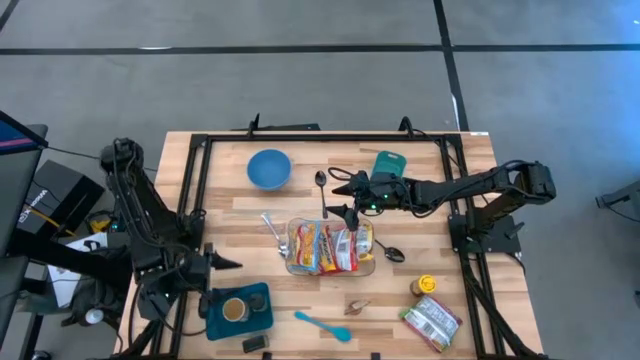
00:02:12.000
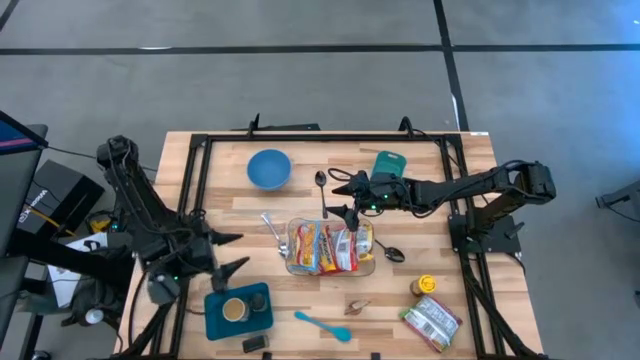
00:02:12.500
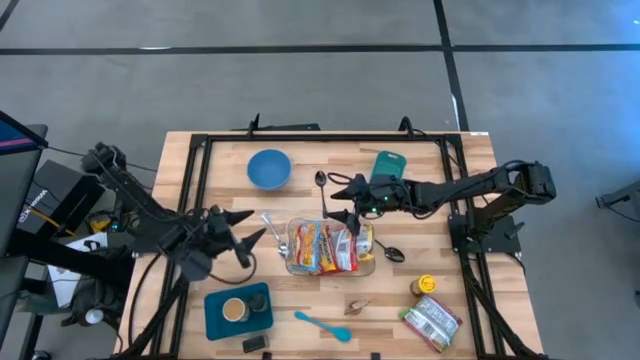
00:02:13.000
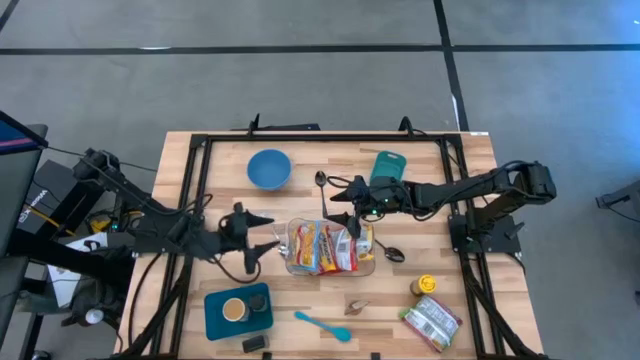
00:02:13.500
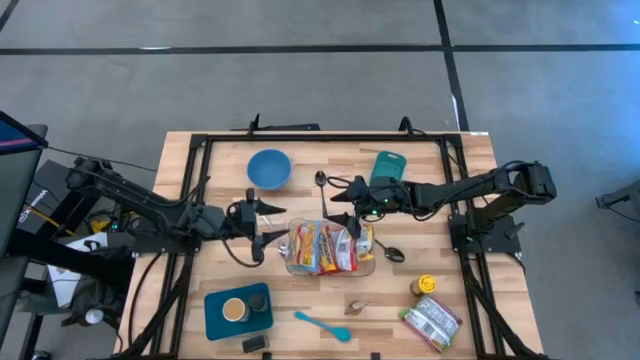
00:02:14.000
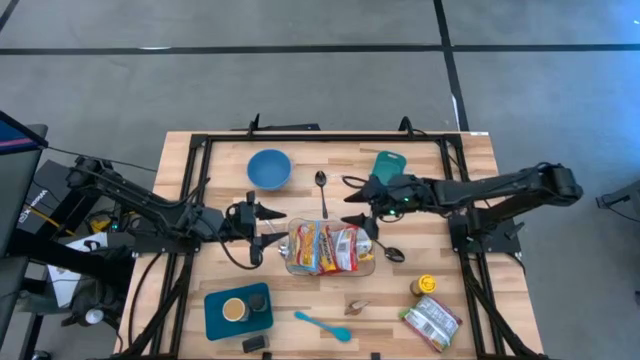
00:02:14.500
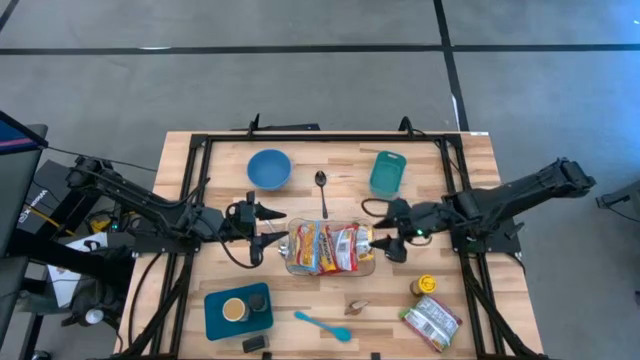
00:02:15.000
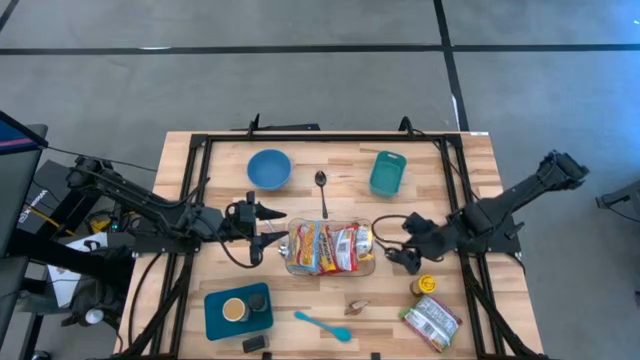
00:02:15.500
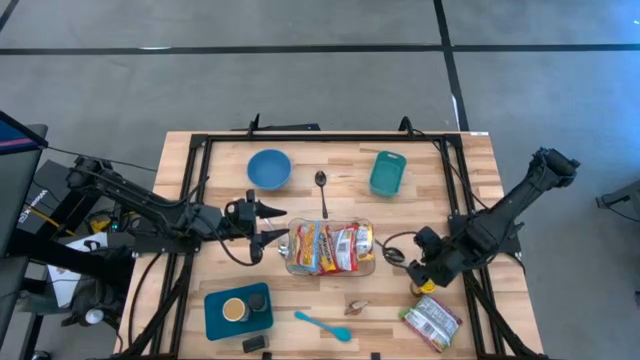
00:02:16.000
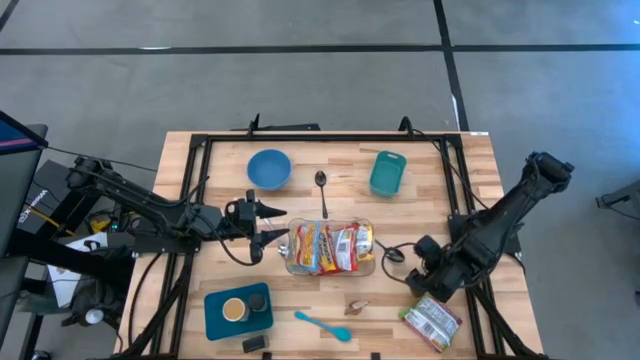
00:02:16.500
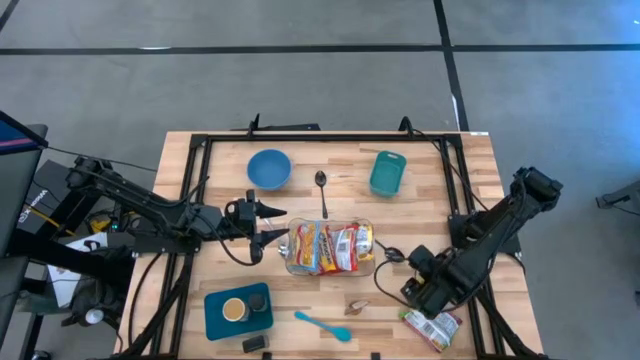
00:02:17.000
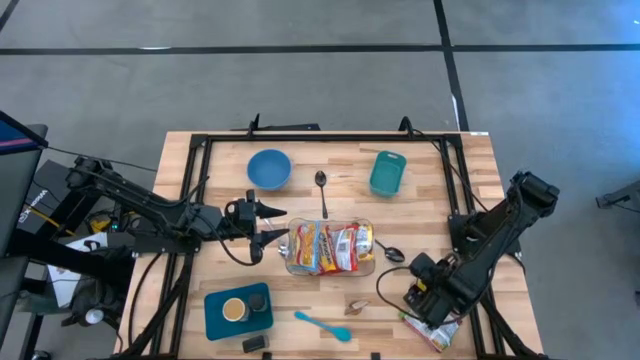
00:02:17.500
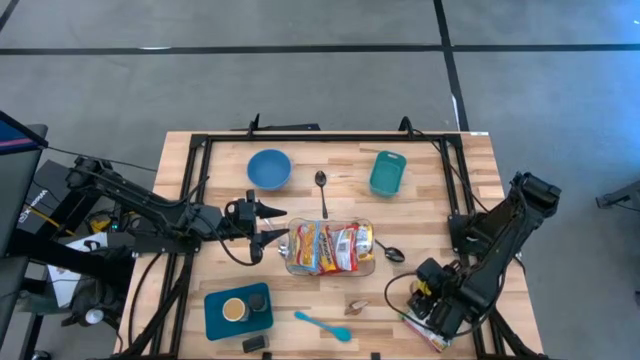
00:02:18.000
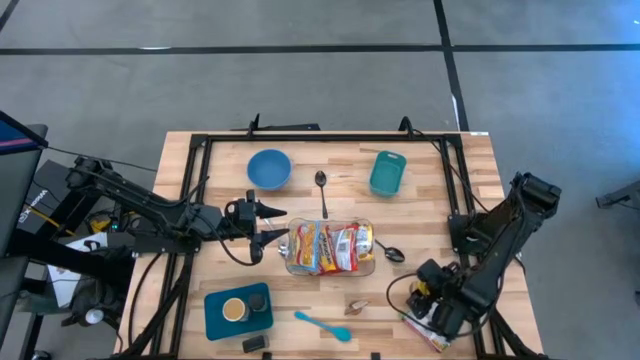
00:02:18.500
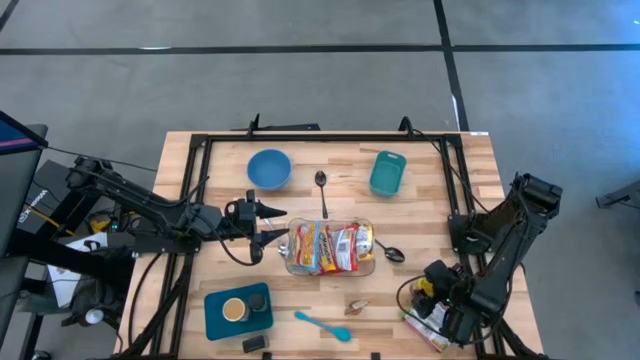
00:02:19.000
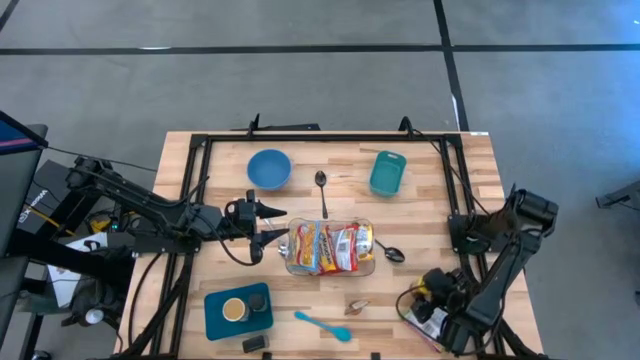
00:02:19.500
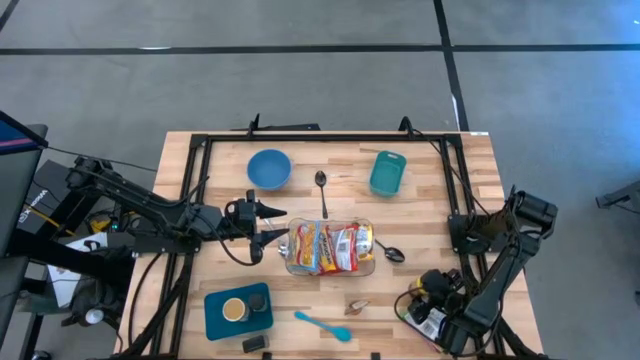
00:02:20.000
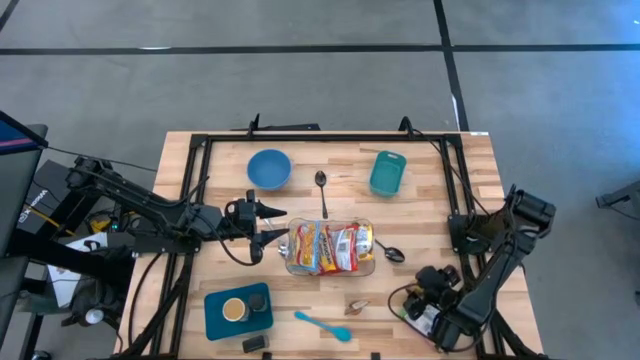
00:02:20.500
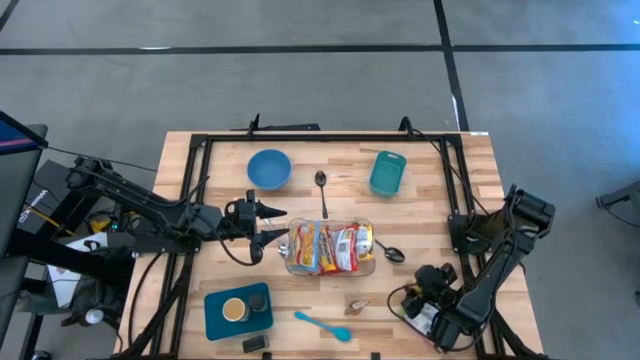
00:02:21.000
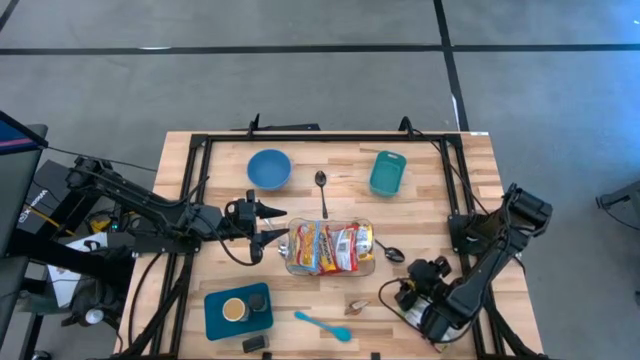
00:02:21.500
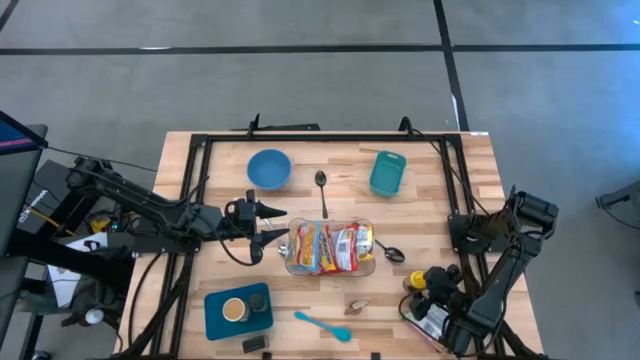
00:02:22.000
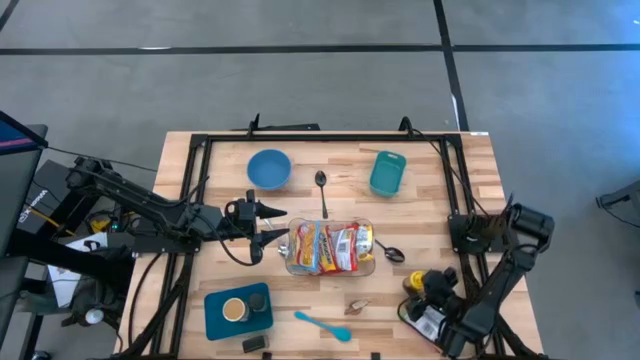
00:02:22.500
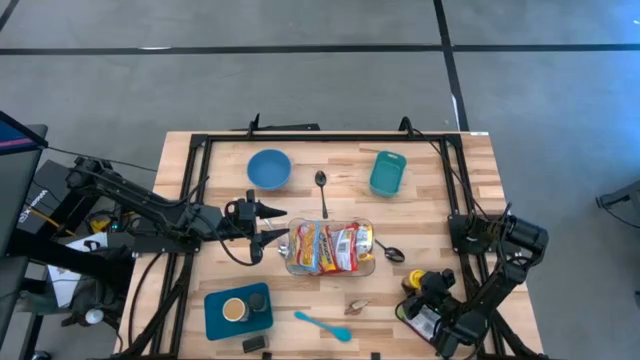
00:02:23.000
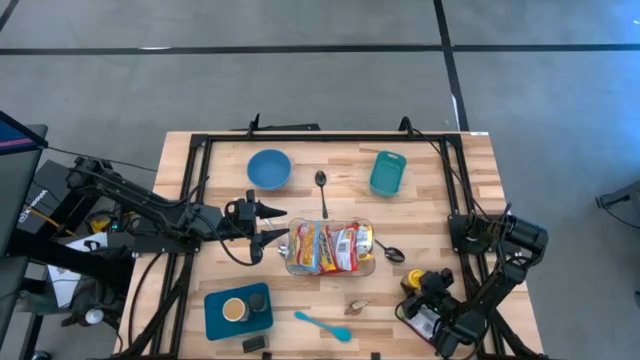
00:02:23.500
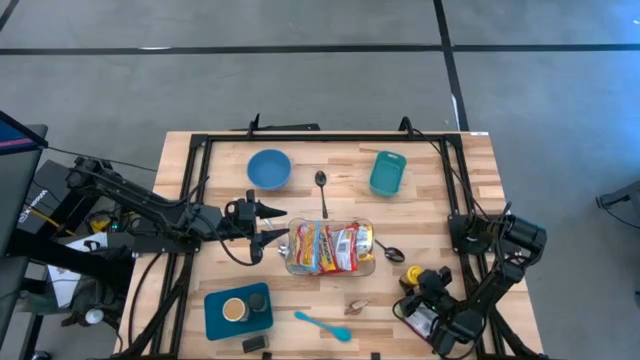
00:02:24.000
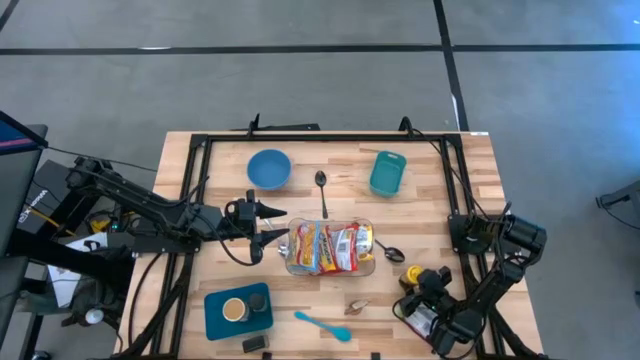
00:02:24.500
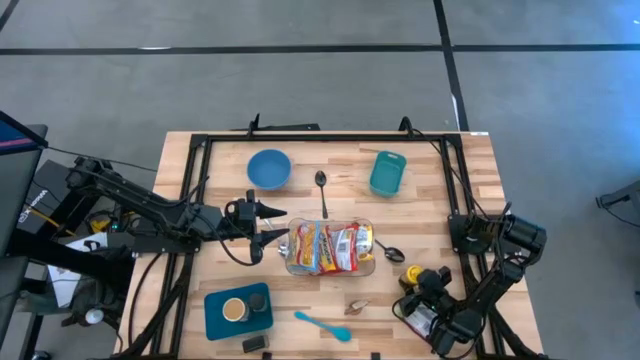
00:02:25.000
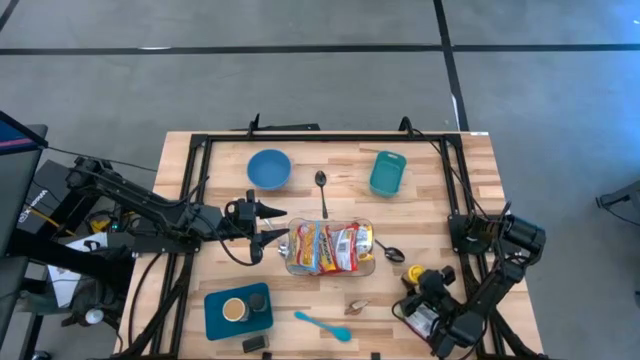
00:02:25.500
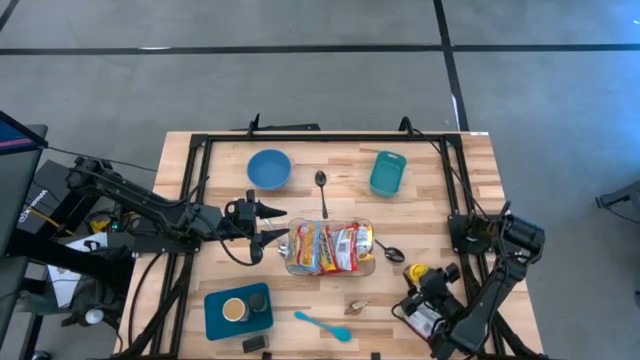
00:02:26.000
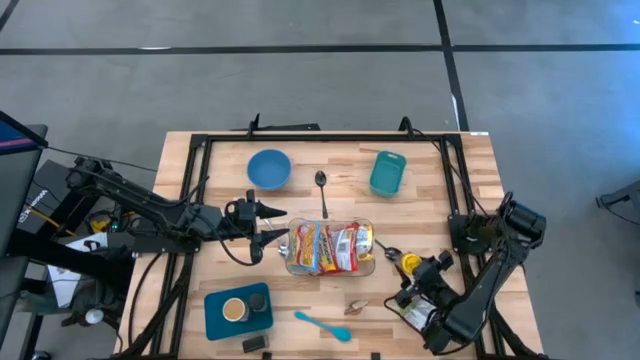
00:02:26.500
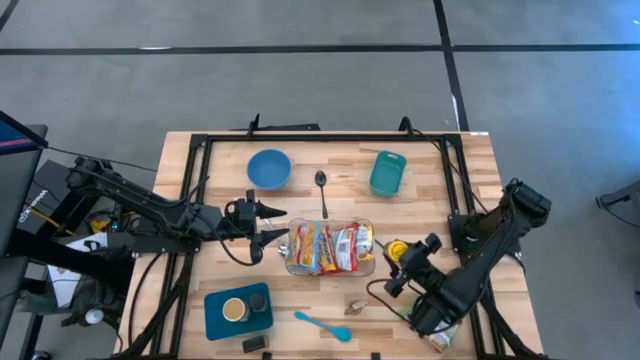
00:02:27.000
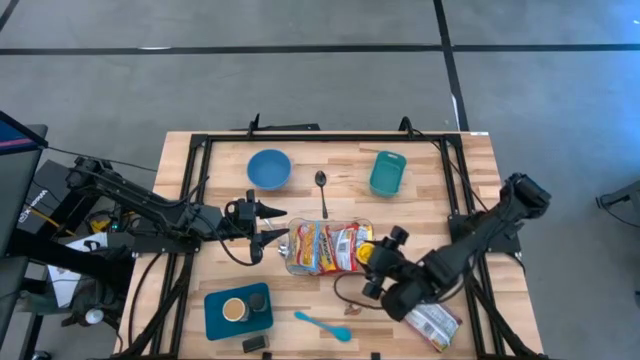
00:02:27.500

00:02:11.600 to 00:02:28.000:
Task: Pick & Place Food Item
Put the yellow spice can into the dark blue bin

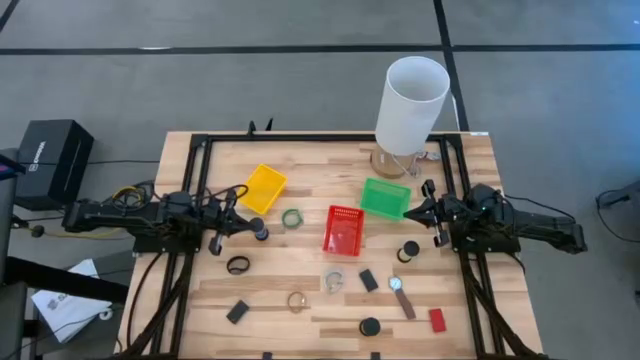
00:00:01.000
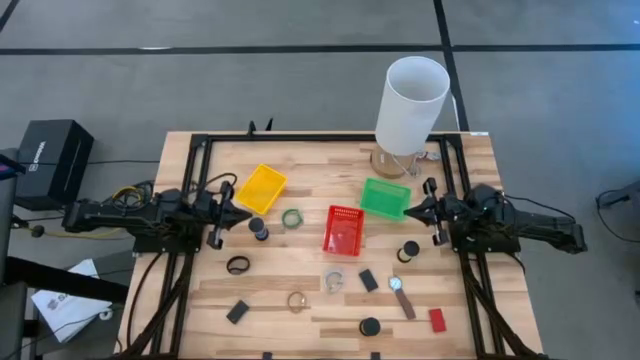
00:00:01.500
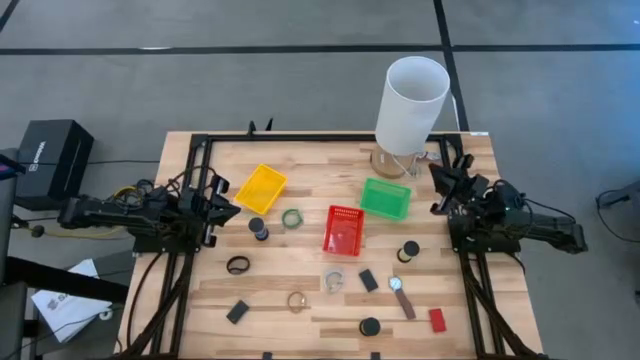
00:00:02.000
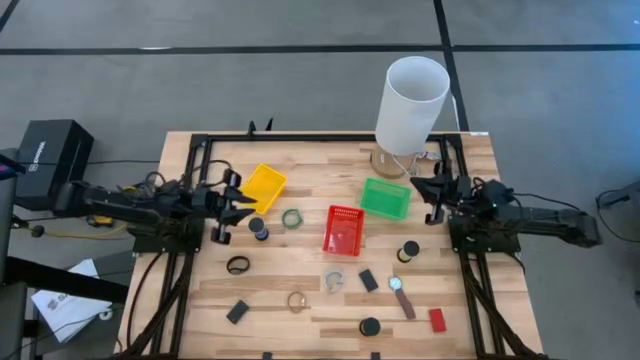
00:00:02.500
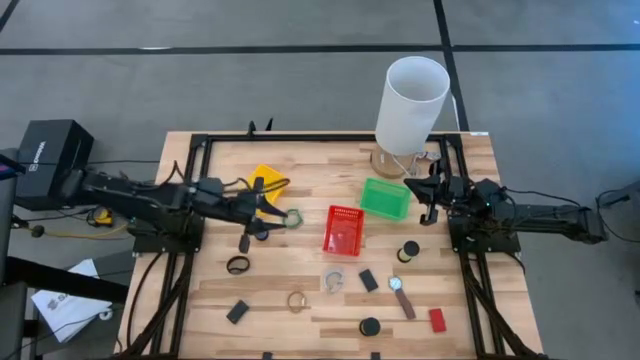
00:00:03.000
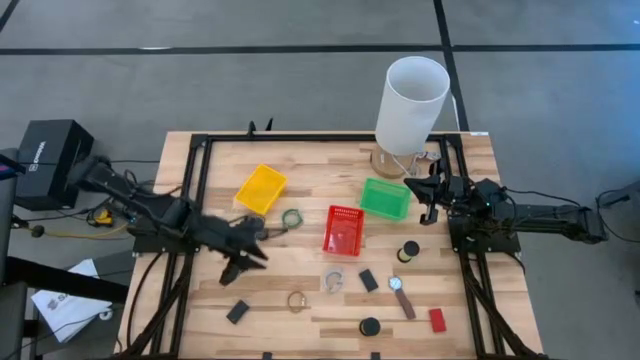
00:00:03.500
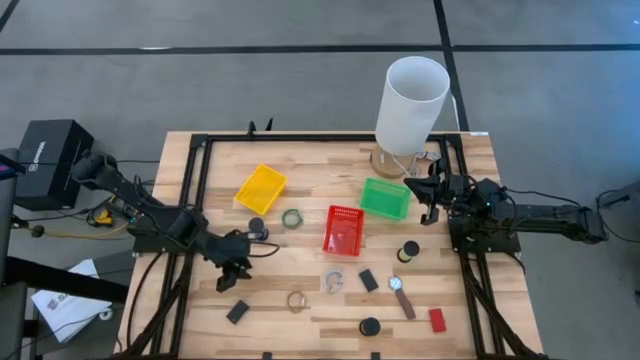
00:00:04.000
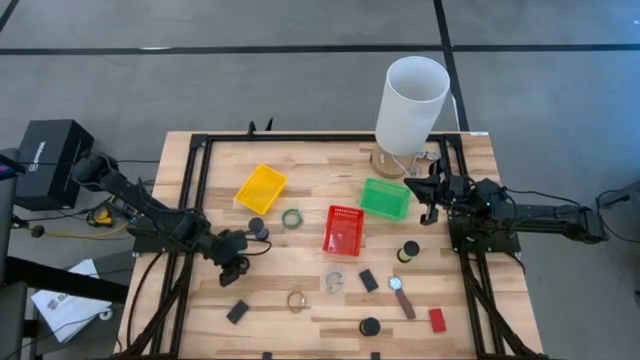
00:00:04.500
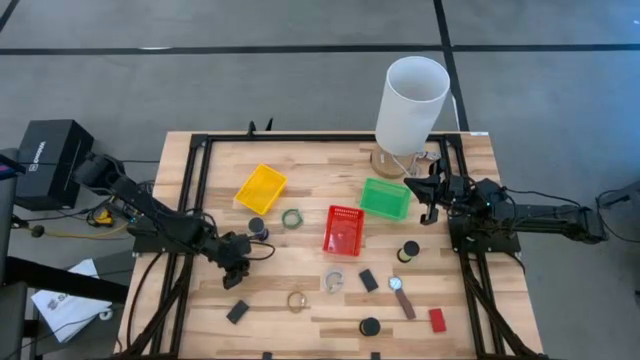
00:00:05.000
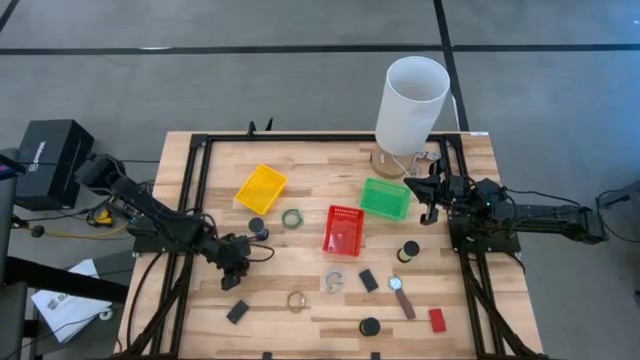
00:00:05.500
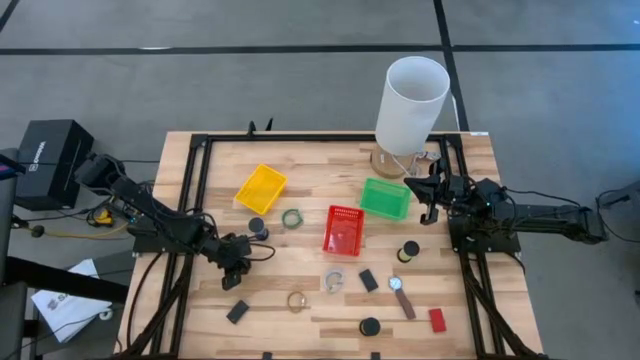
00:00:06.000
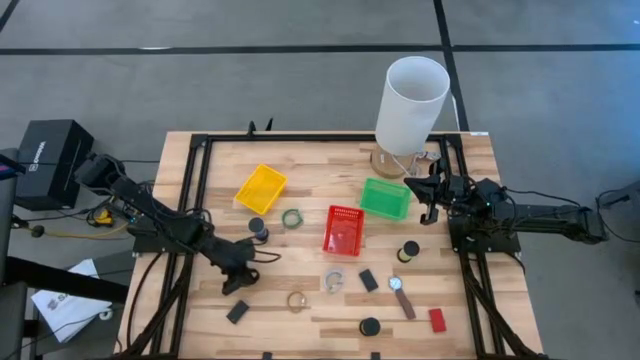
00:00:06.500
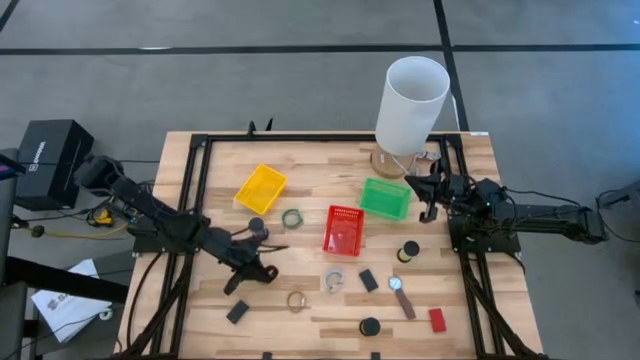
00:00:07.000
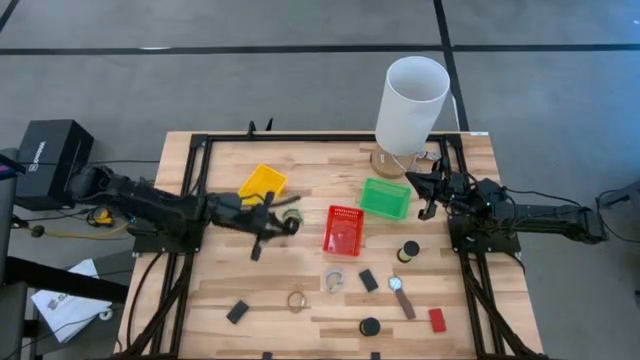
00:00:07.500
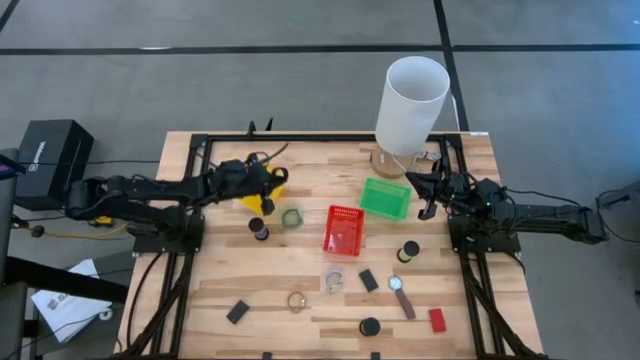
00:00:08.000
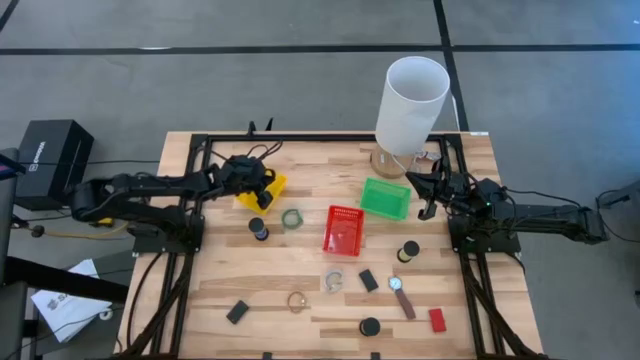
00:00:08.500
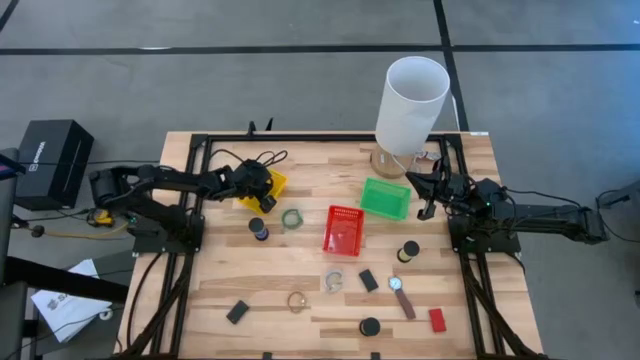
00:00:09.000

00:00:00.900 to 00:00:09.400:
Task: Pick & Place Office items
Put the black wristwatch into the yellow bin
